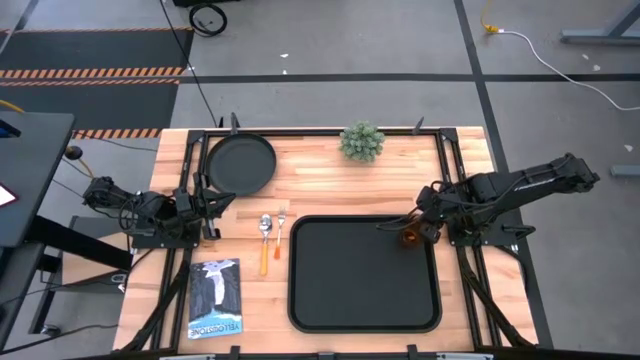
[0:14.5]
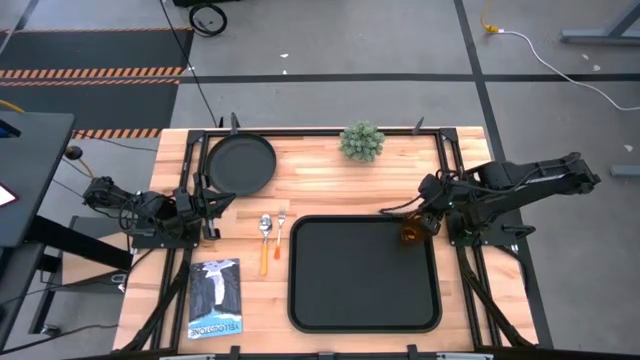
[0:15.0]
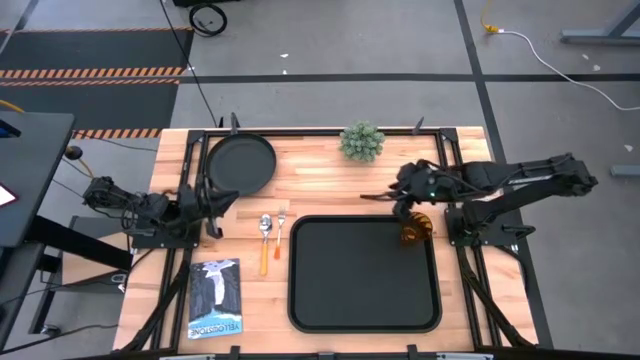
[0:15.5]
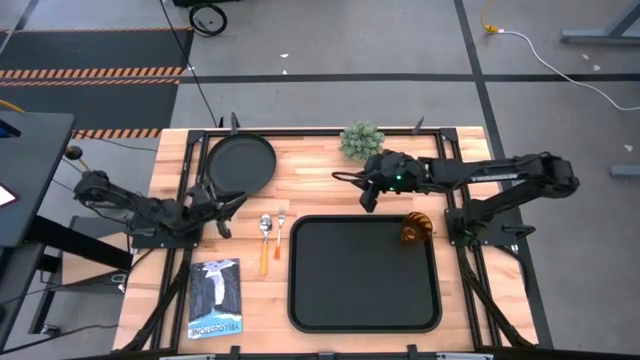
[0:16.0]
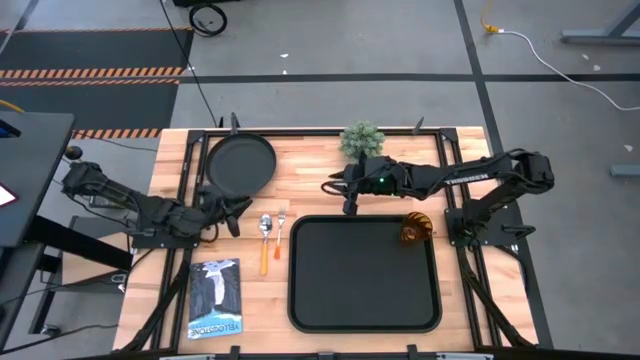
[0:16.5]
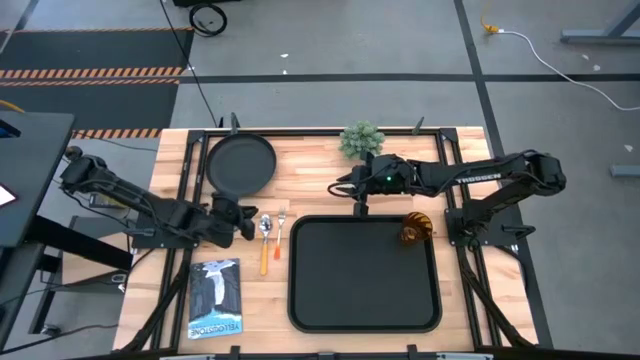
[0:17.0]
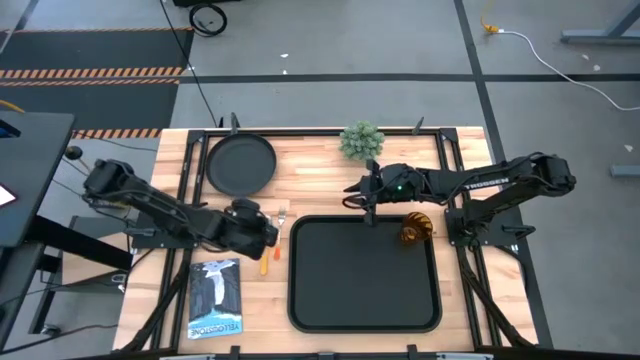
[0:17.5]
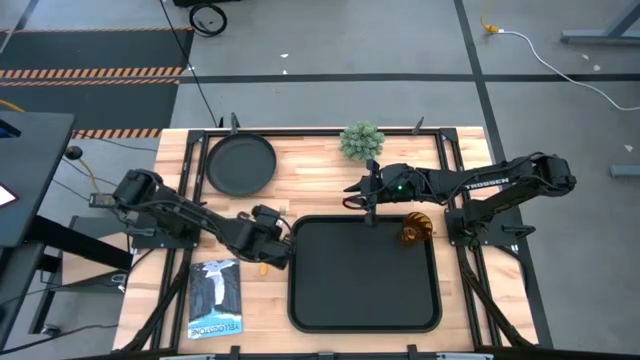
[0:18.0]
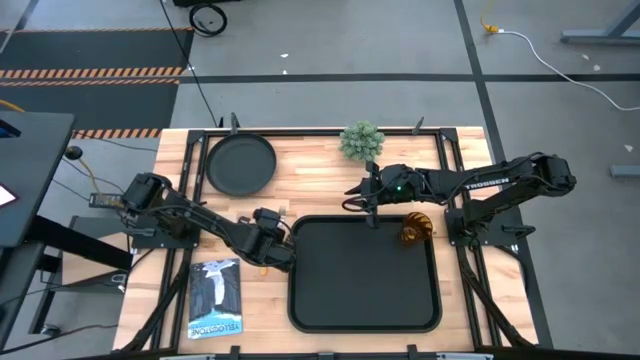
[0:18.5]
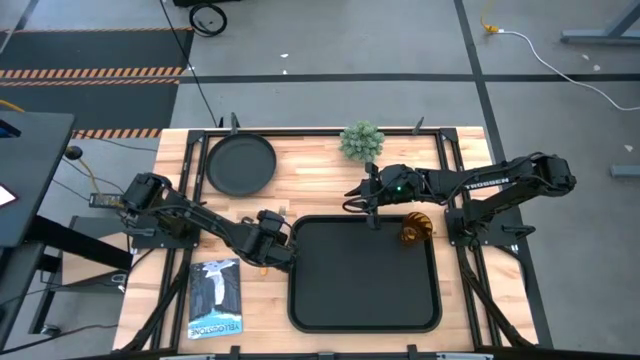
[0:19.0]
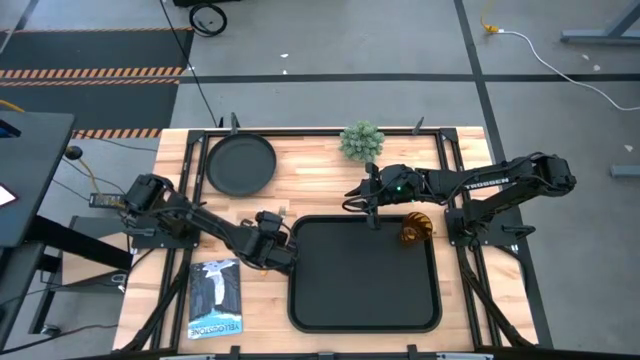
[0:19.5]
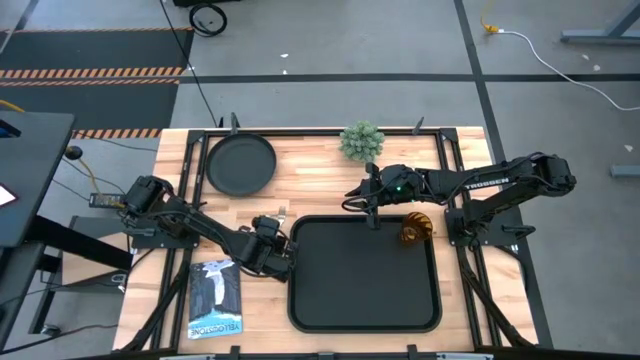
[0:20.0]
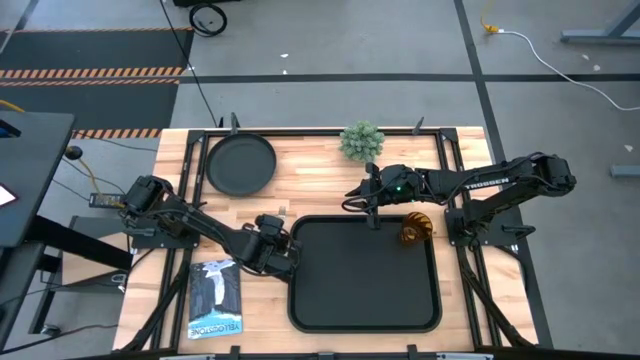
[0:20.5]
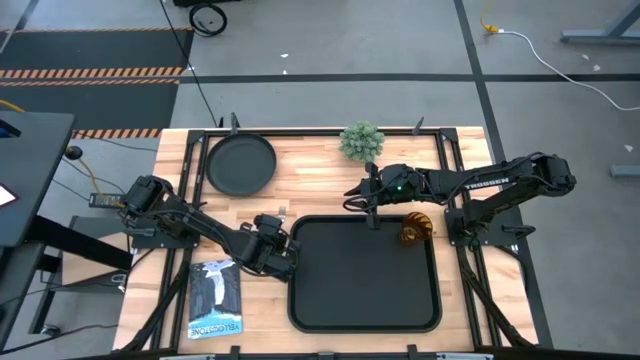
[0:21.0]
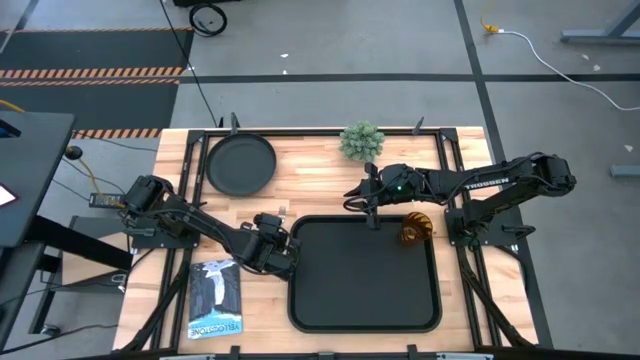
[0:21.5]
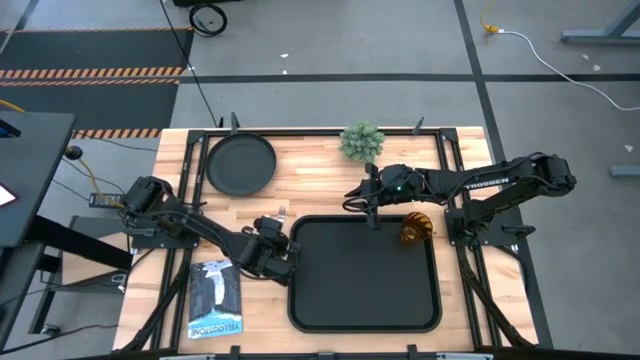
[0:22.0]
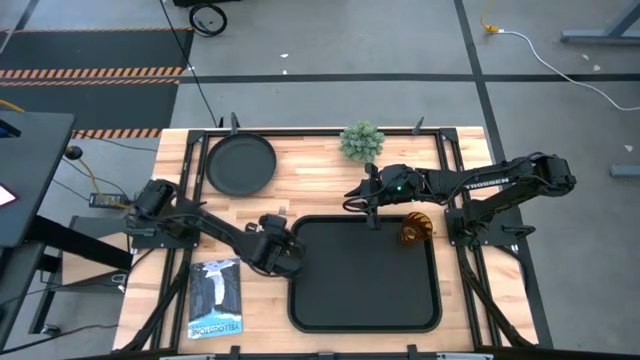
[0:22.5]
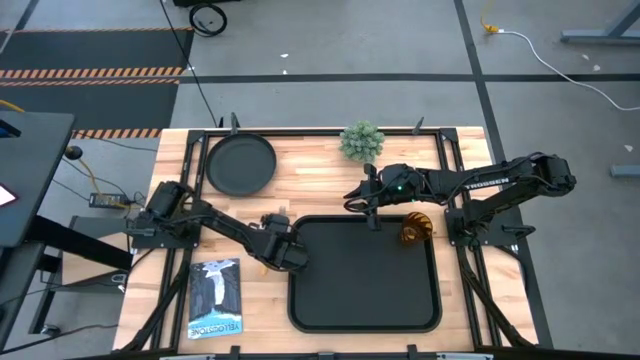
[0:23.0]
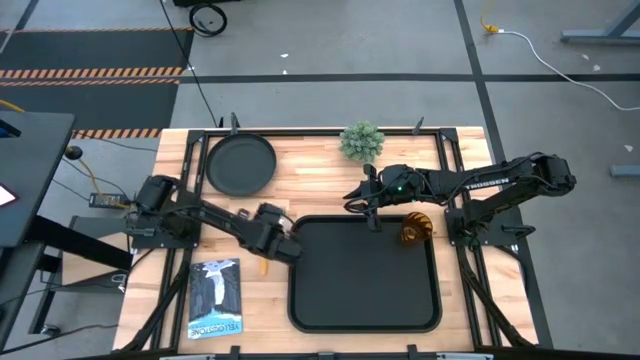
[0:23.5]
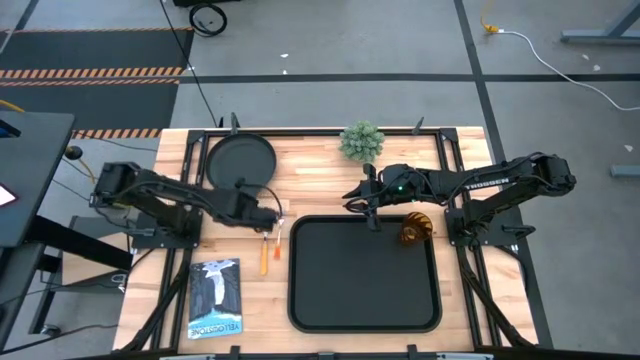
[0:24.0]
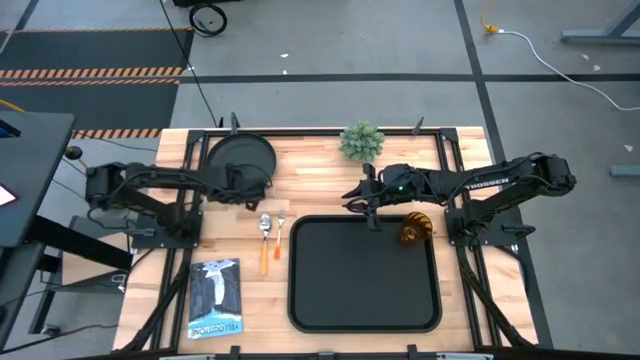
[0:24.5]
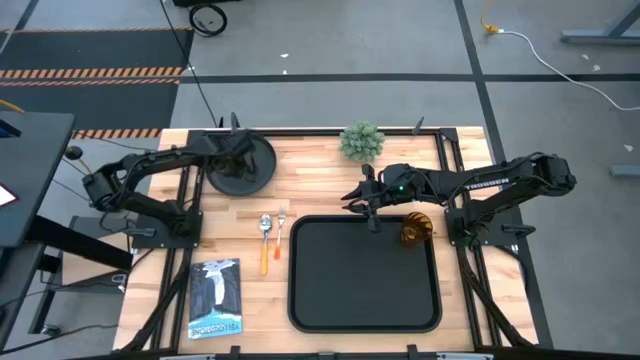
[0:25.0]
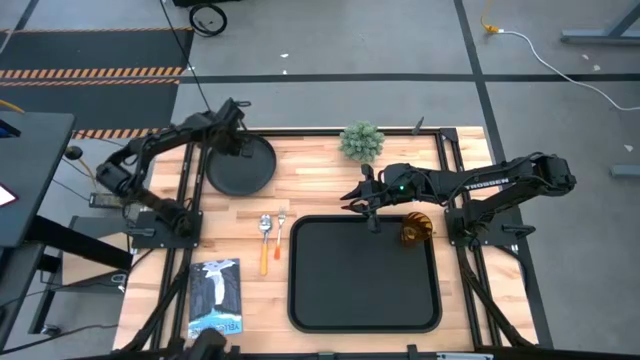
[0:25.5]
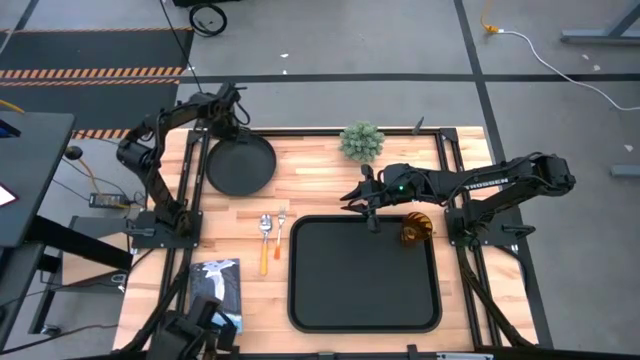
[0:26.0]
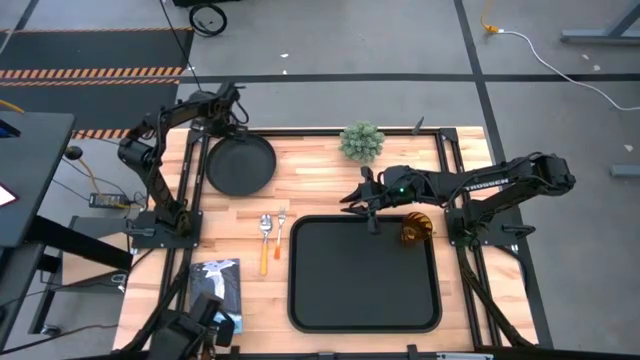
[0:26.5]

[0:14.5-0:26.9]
Task: Pick and place plate/cup/fork/spoon on tray
Put the black plate on the black tray to the bottom left of the brown cup

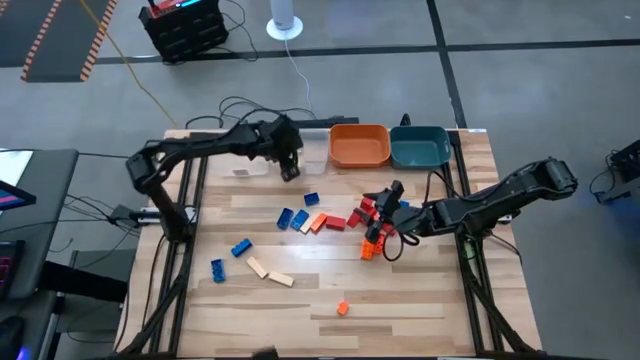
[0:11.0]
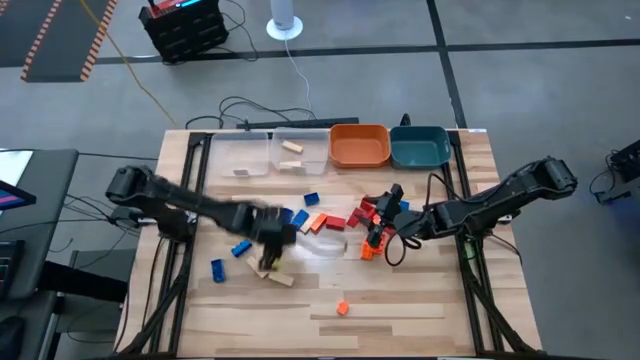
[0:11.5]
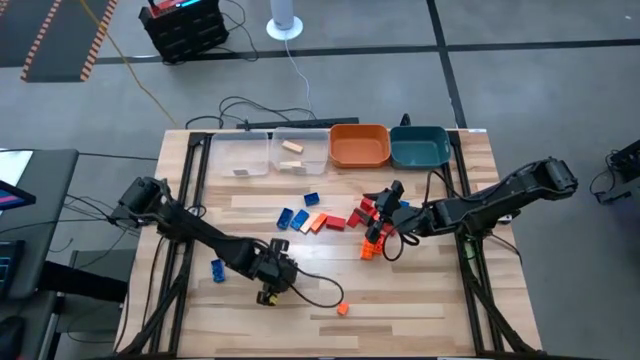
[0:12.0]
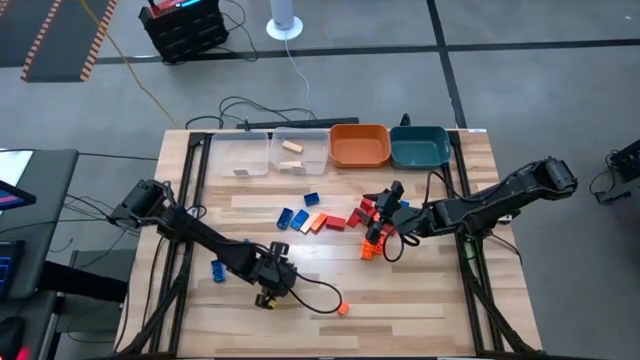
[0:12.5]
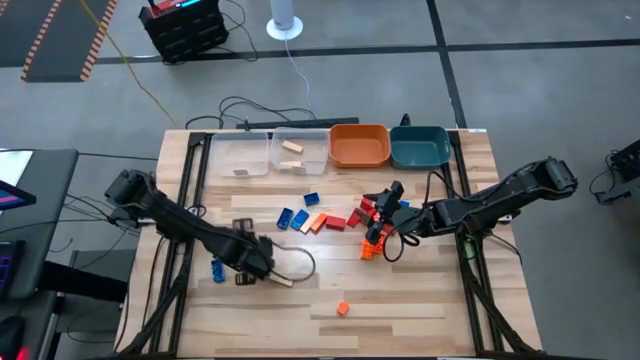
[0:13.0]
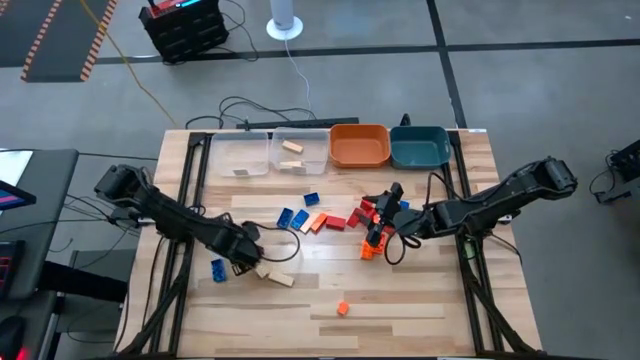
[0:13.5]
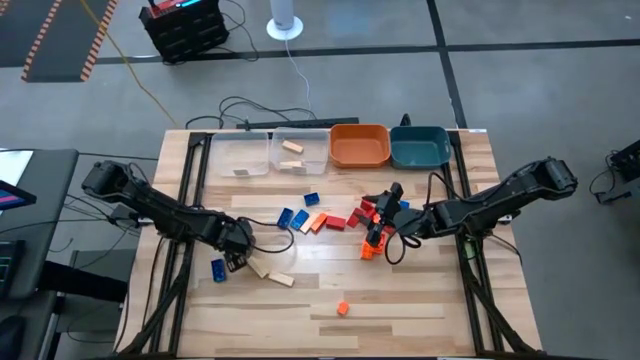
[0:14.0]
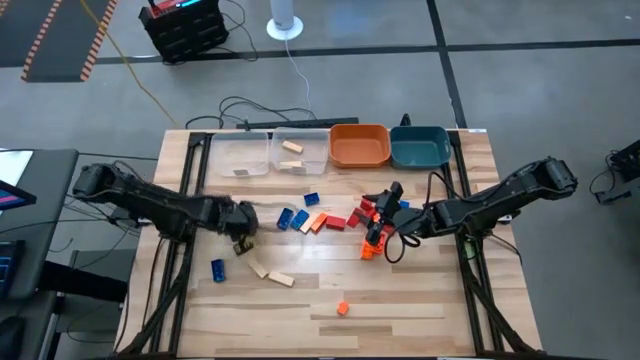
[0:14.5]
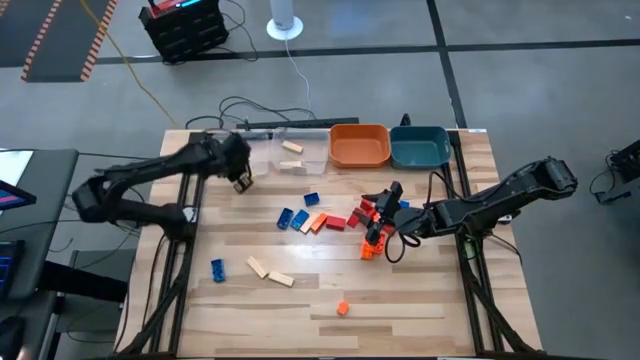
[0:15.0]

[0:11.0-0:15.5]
Task: Sort blocks
Put the blue game piece into the left transparent bin

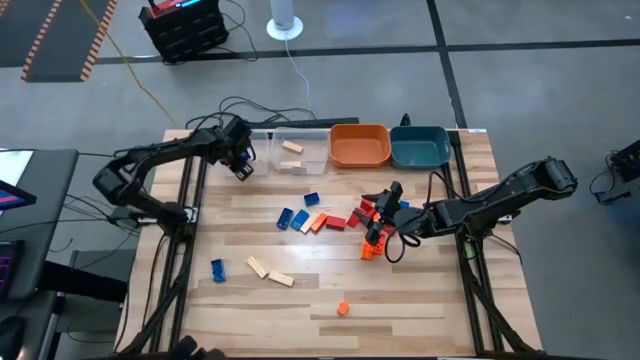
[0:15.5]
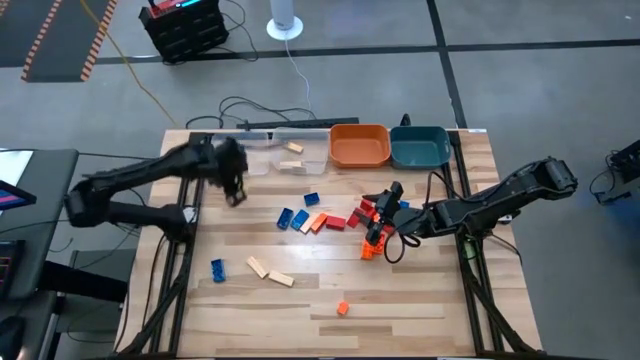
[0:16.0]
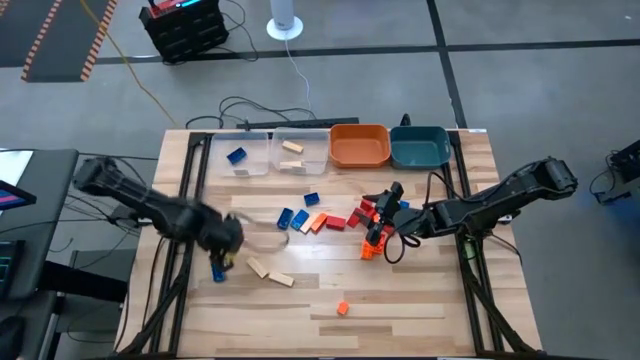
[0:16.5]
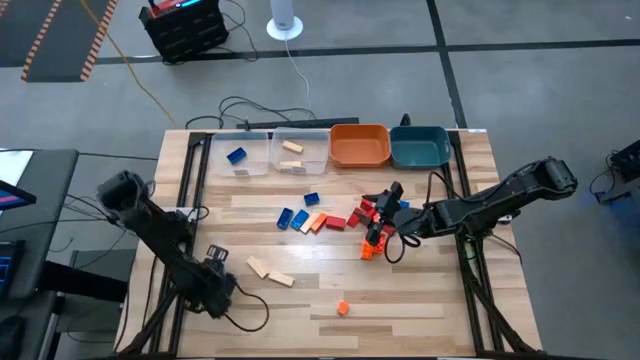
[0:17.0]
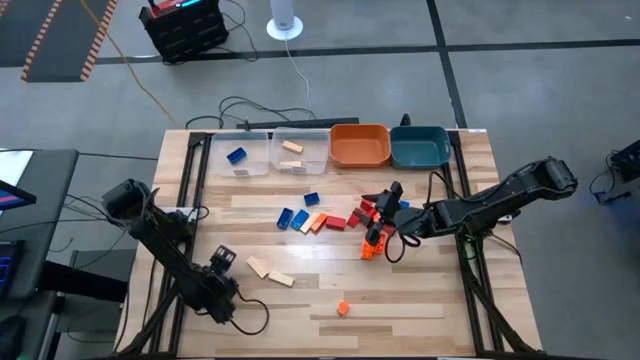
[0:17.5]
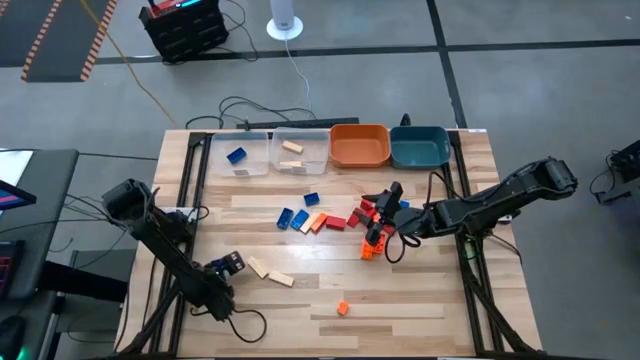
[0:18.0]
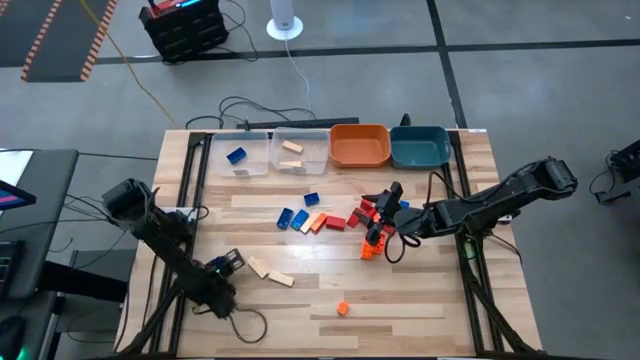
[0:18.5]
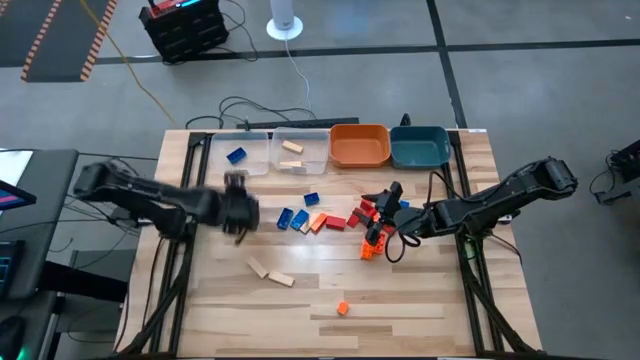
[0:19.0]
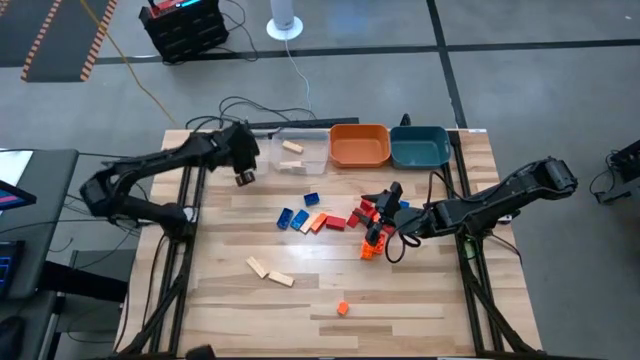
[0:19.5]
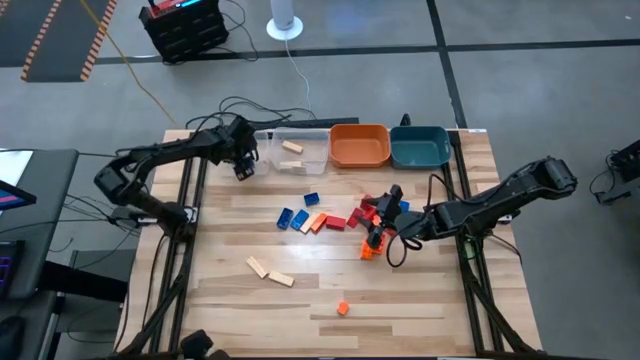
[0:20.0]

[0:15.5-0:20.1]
Put the blue game piece into the left transparent bin
